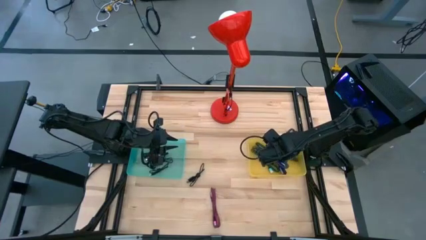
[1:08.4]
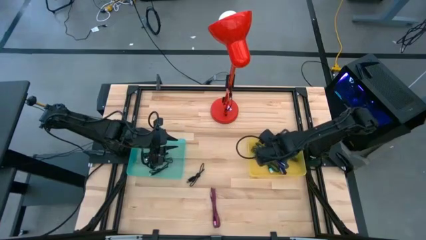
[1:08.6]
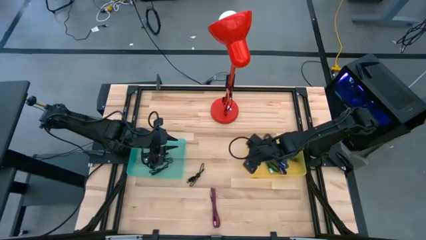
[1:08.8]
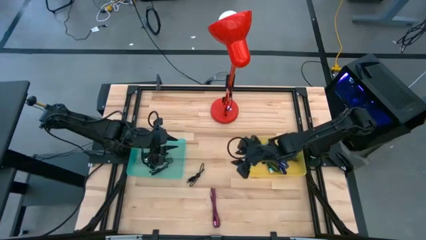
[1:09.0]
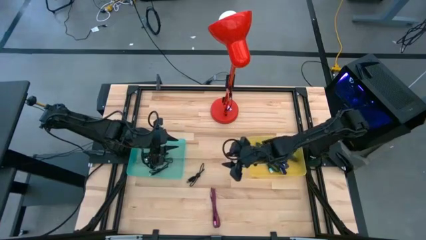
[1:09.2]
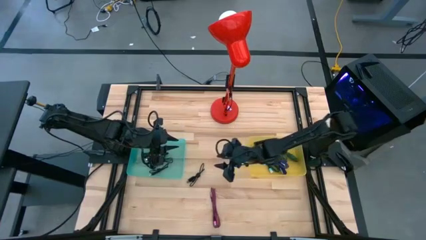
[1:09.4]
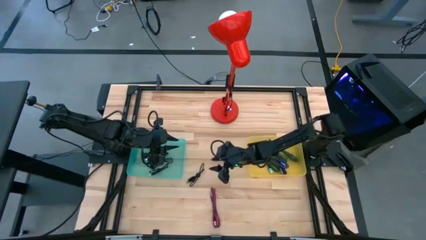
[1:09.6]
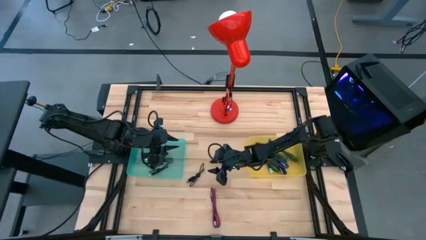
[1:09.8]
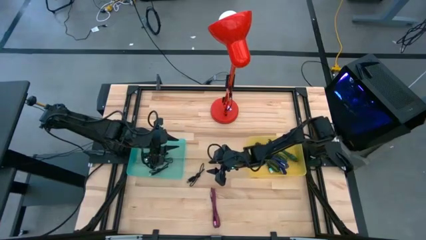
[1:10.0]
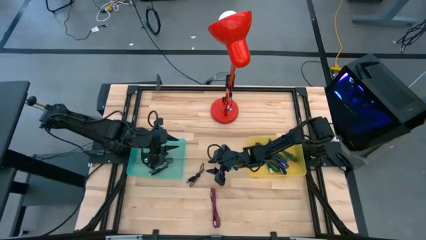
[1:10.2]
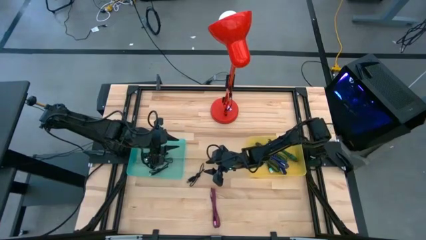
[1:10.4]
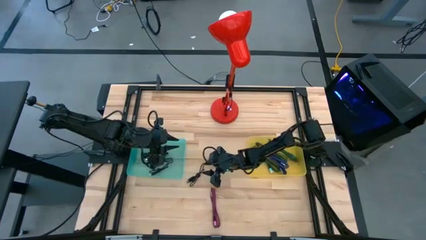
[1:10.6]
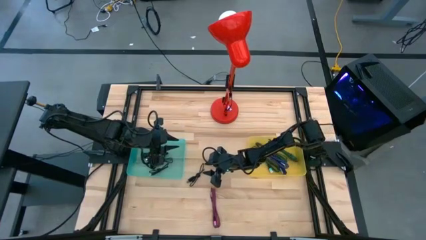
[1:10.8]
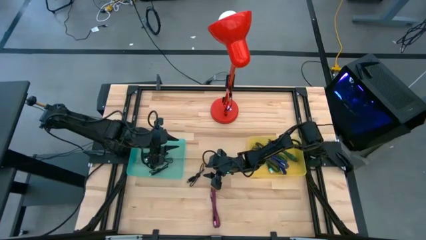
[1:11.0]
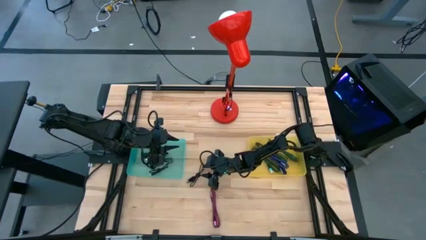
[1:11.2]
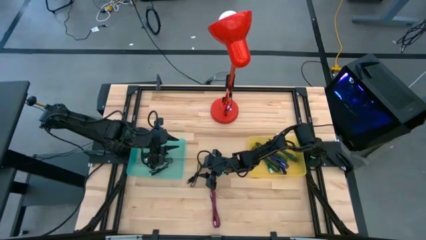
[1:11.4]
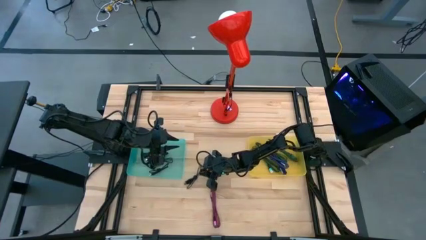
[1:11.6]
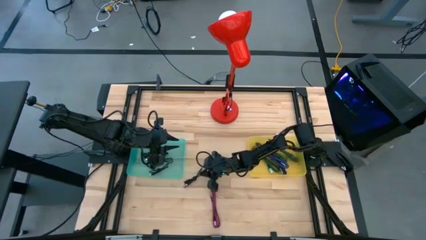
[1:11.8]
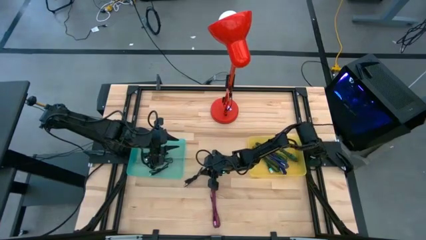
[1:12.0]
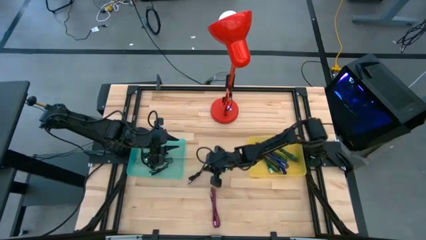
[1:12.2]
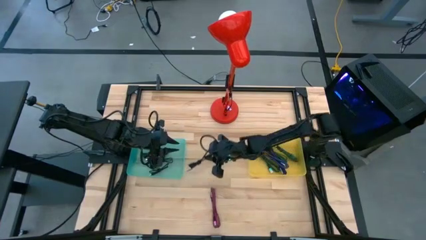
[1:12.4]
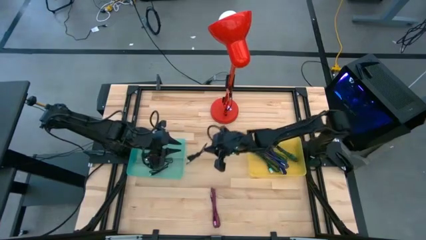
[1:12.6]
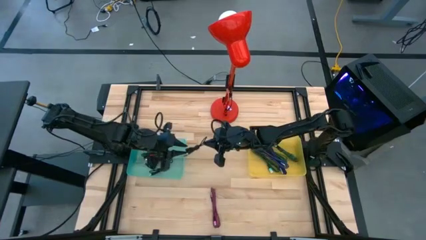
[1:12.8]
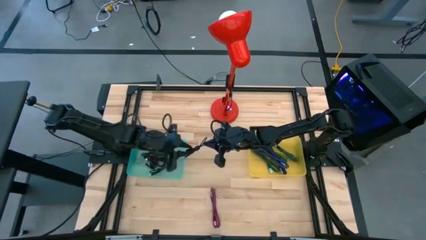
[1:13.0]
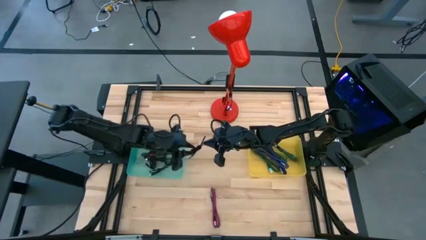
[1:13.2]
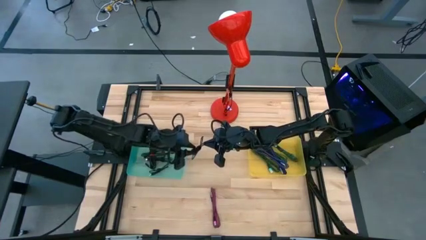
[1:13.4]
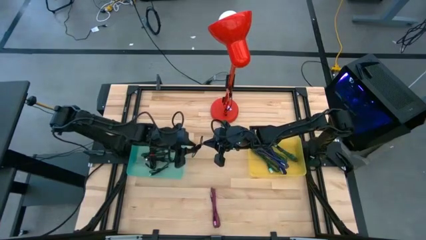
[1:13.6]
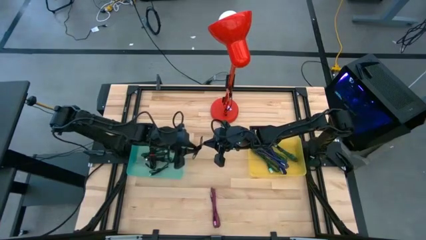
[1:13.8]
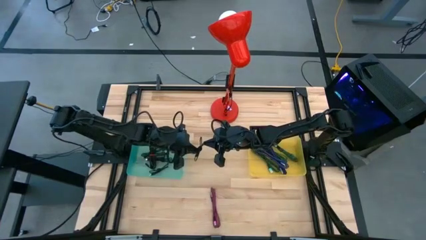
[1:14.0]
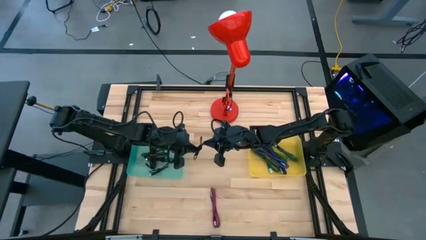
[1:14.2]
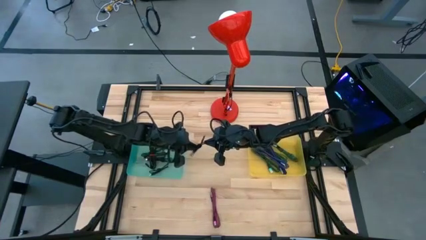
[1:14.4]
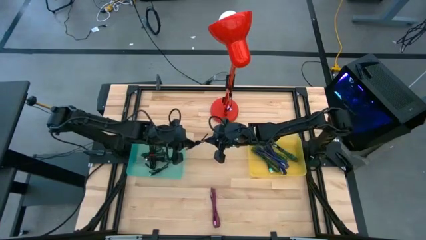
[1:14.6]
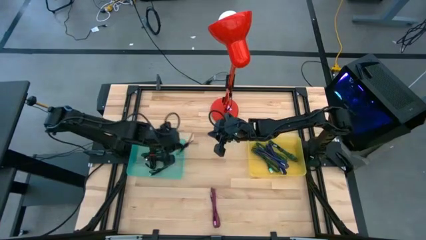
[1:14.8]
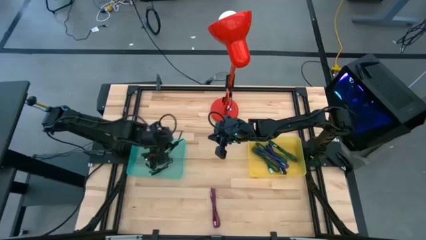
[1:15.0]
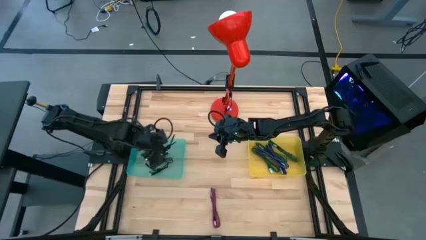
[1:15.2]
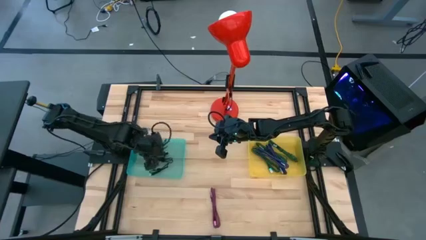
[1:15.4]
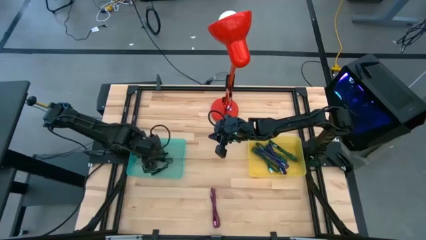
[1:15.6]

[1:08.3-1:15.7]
Task: Pick & Place USB Port
Put the black charger cable into the green bin

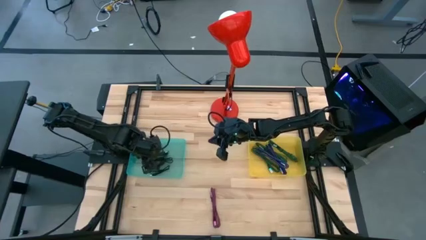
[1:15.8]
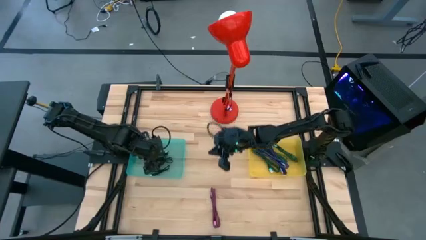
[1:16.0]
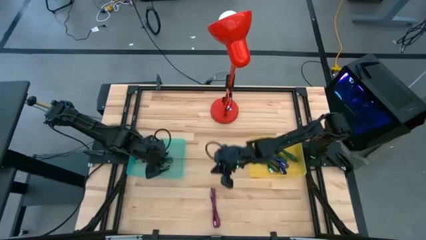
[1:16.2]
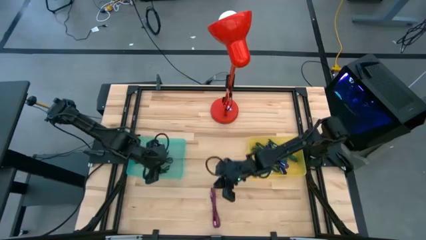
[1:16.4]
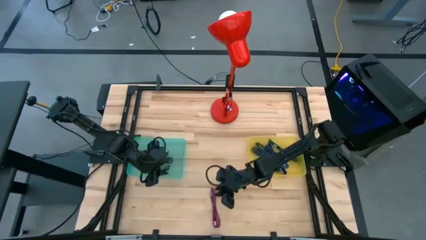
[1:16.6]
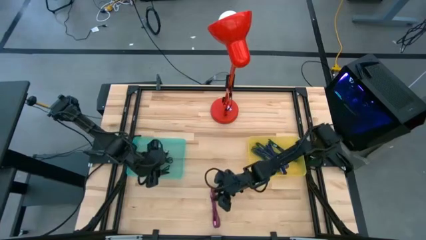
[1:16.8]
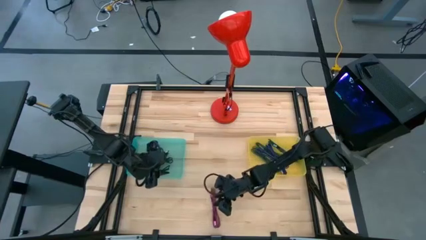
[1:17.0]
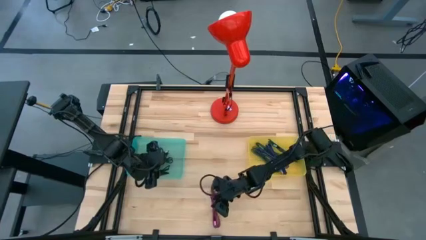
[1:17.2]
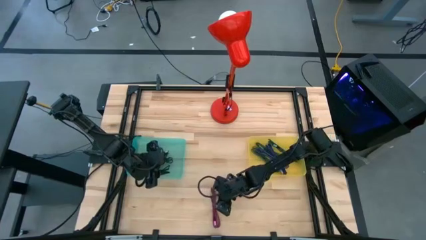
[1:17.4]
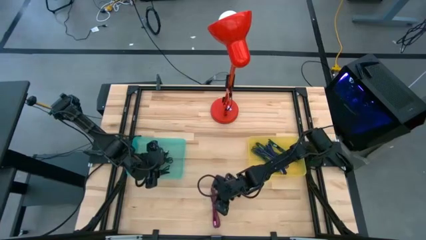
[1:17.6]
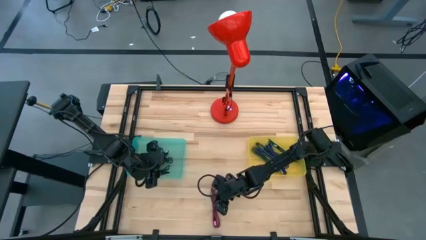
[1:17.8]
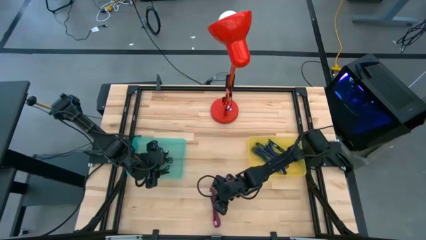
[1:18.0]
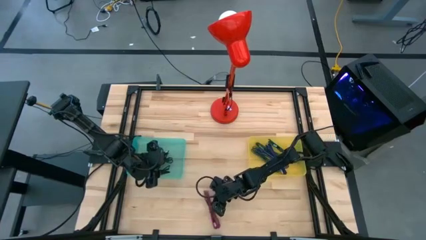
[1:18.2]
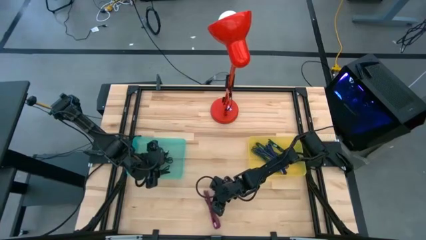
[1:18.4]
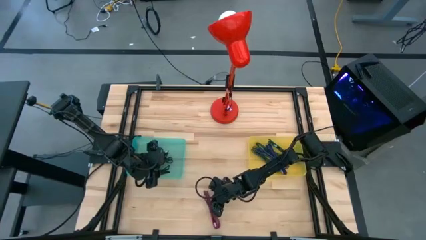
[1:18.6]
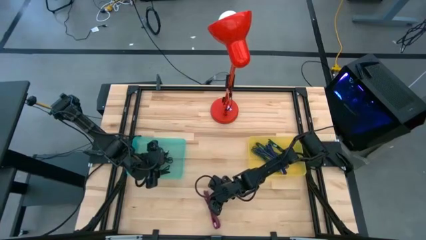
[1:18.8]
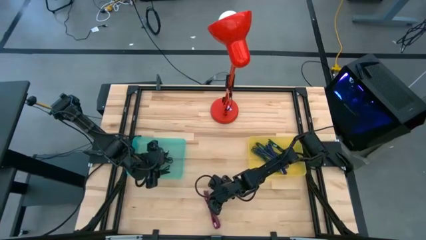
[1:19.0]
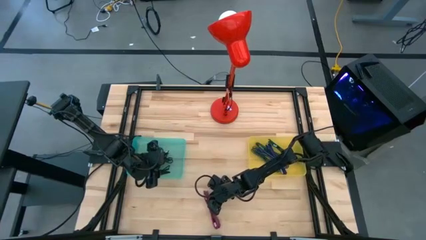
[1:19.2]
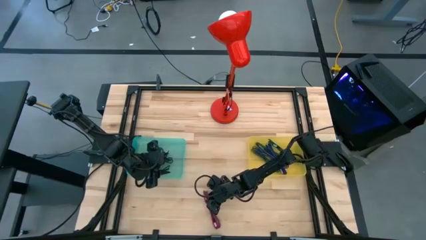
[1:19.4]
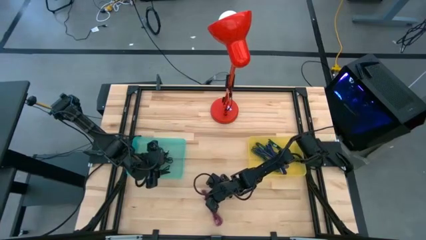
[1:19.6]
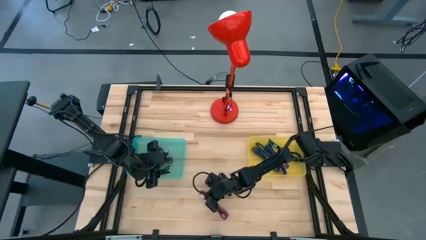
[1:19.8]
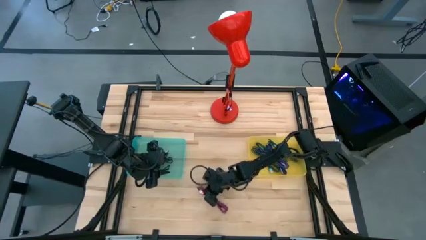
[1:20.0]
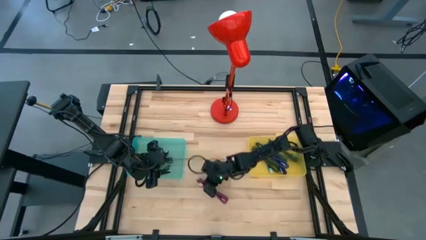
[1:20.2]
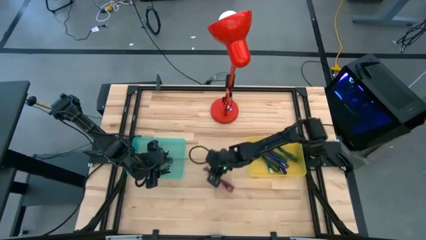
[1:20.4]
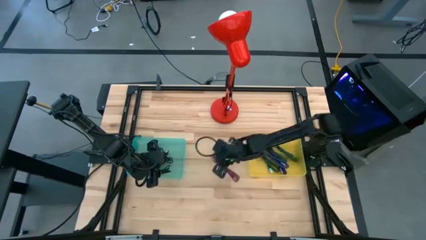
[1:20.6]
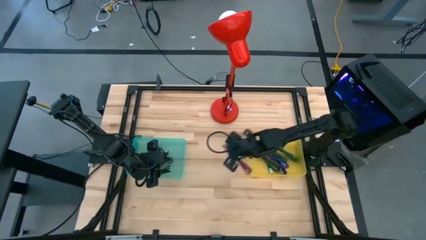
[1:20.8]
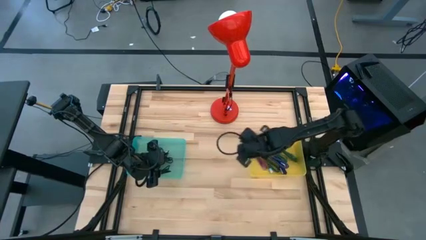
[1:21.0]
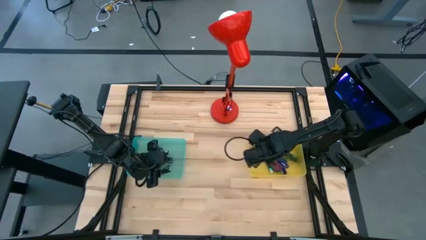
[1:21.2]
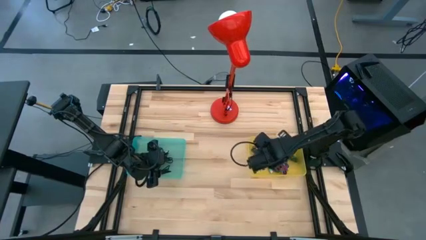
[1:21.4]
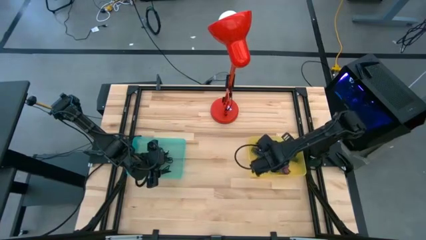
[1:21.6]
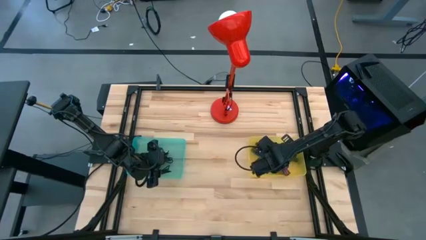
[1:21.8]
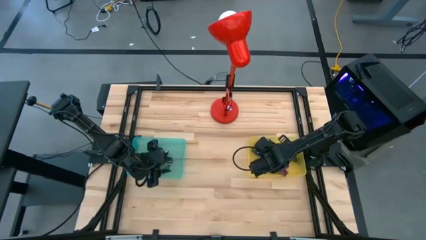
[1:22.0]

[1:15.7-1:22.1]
Put the pink charger cable into the yellow bin

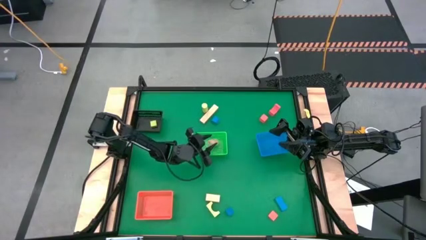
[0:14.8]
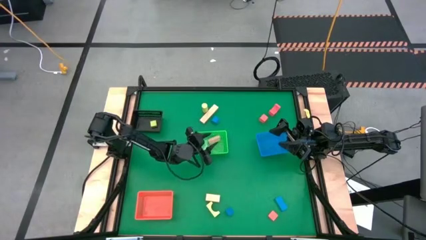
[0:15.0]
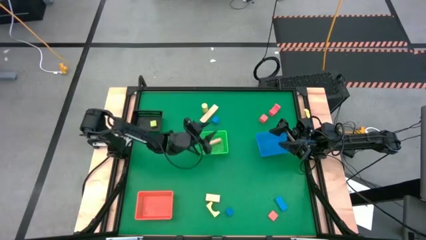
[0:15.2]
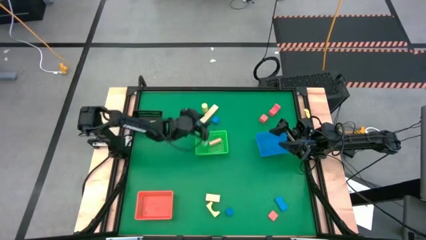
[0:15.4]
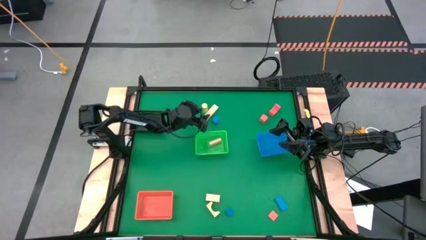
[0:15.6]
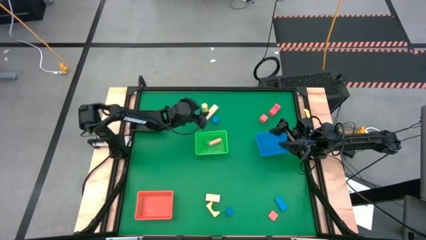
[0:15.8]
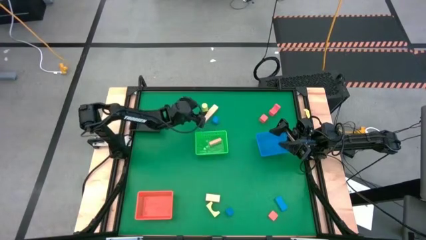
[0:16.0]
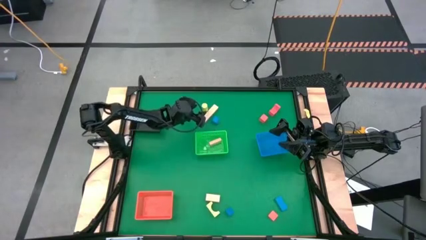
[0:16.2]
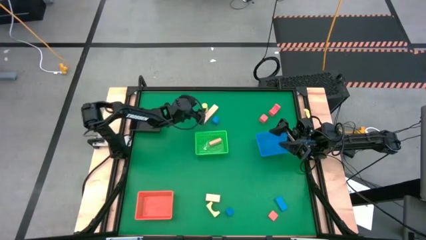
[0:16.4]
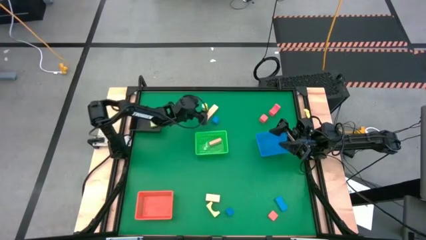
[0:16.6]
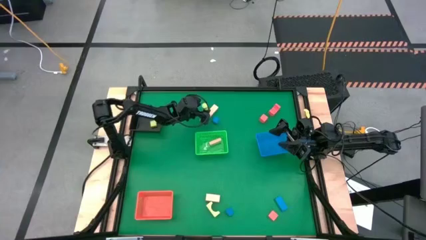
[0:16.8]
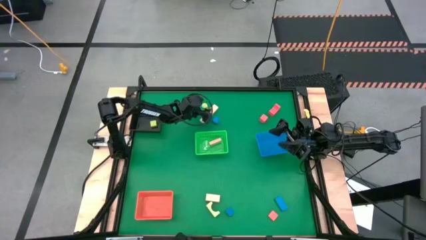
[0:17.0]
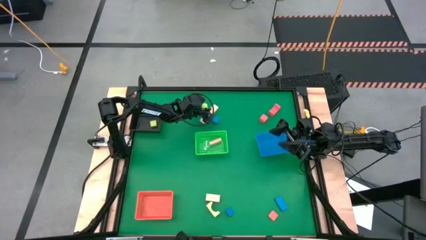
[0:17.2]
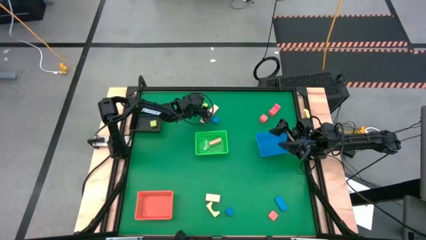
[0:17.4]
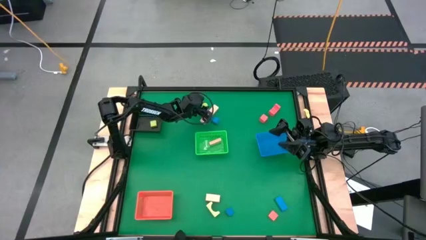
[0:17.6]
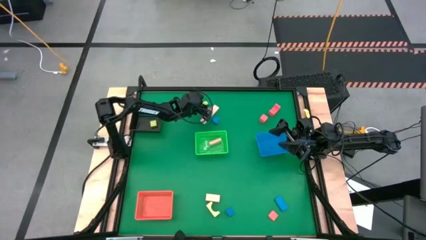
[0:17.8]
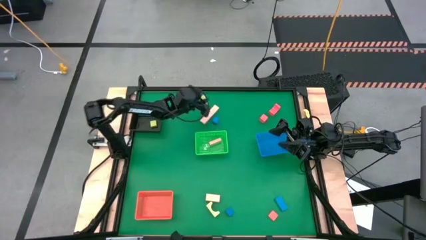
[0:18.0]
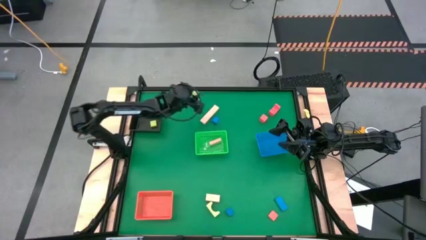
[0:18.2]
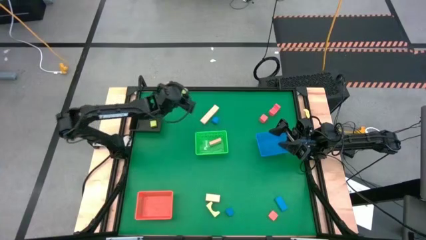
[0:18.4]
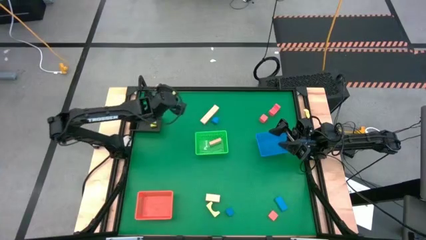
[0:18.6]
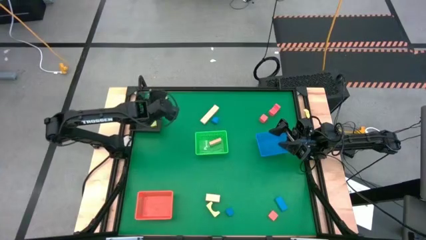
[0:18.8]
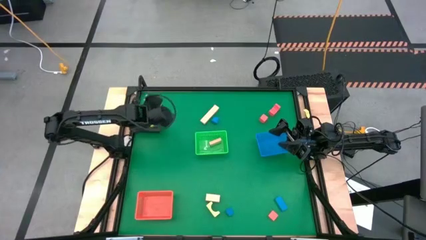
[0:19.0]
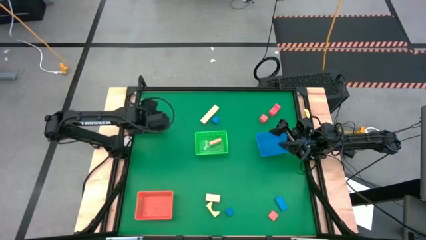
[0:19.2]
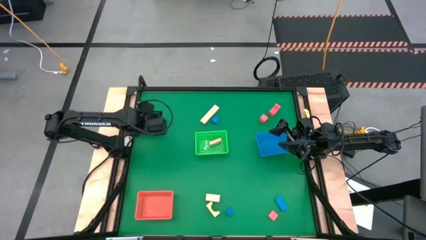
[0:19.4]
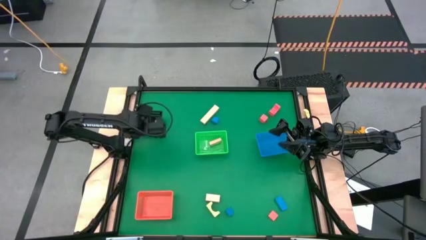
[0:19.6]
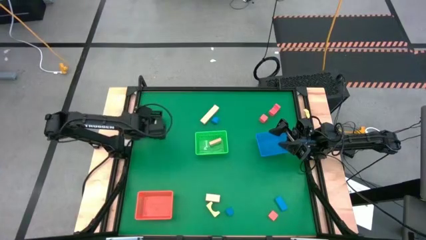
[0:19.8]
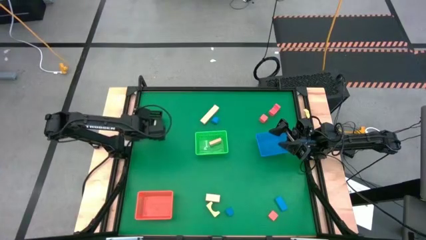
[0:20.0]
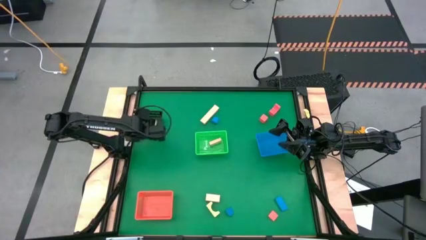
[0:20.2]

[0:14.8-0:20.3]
Task: Sort & place blocks by color
Put the top yellow green block into the black bin
